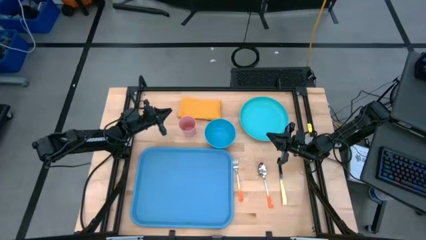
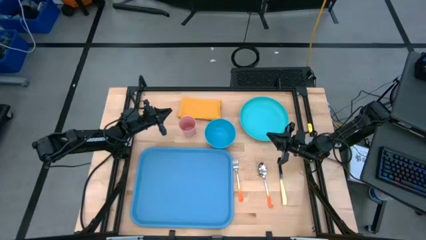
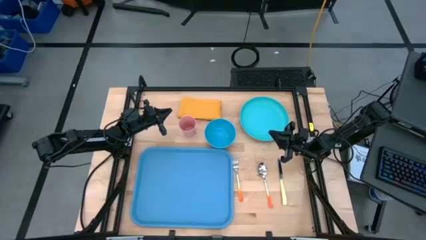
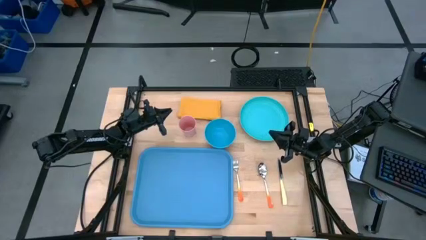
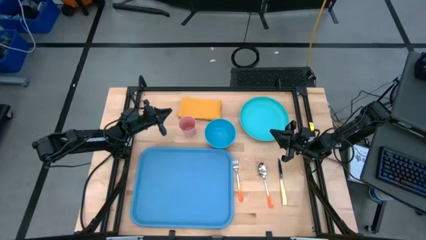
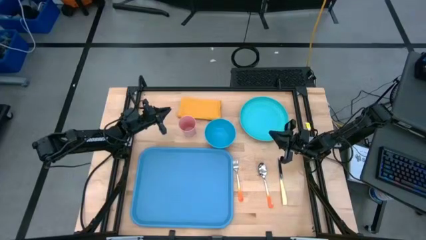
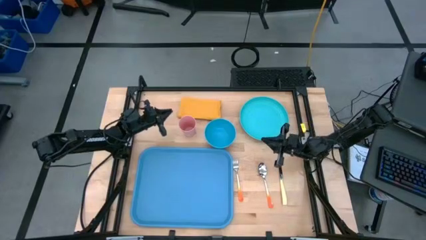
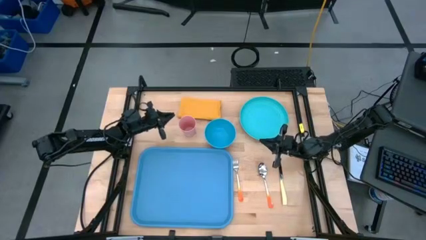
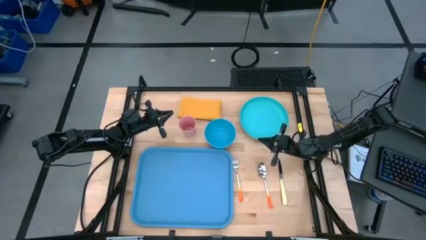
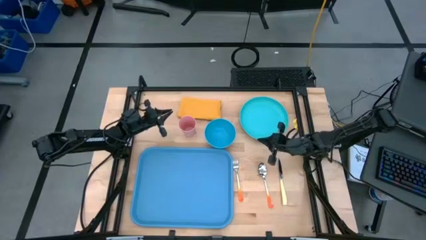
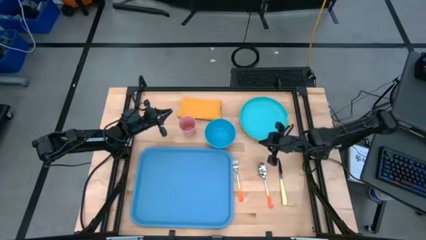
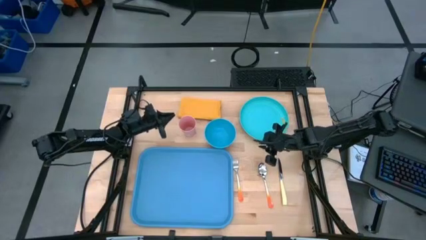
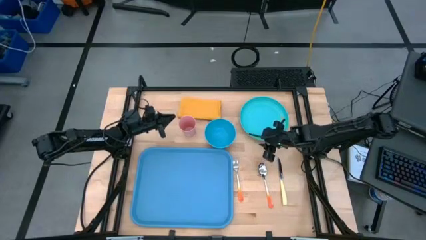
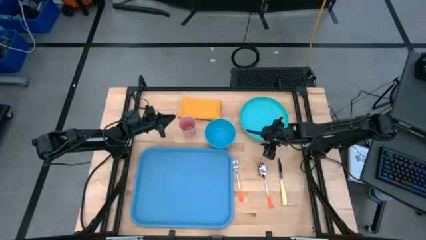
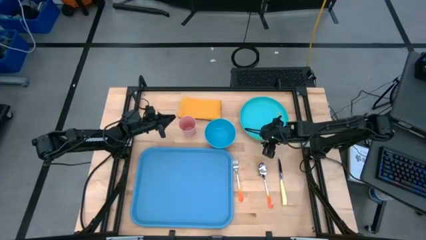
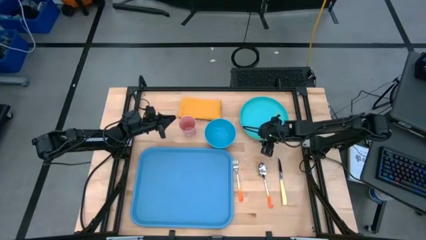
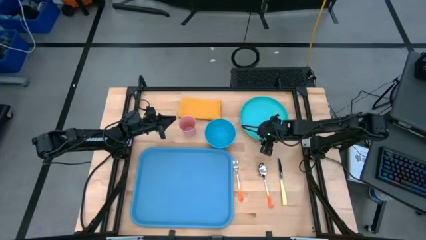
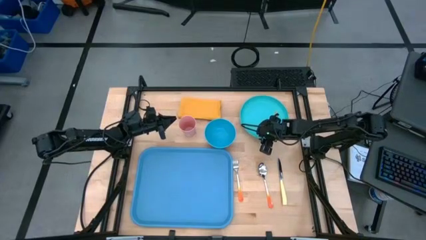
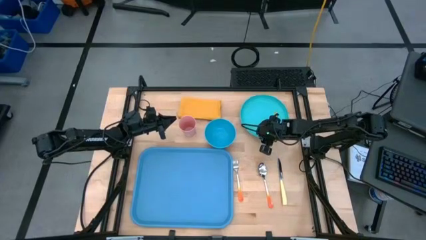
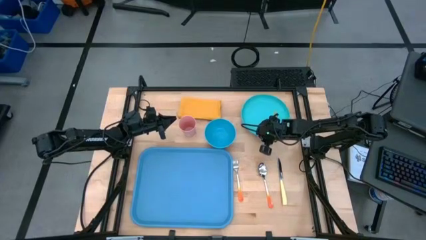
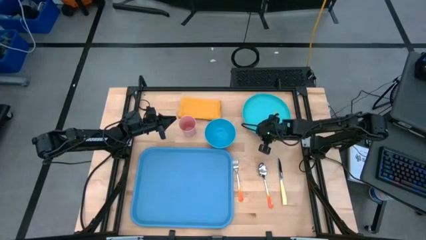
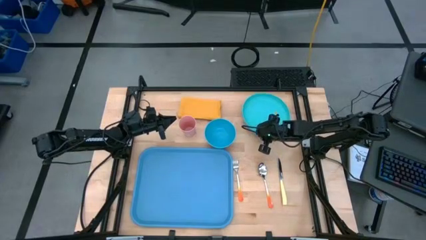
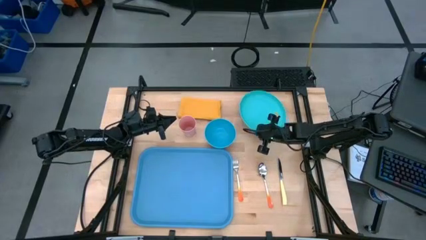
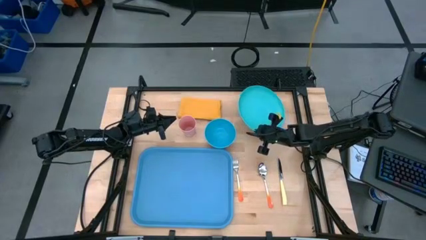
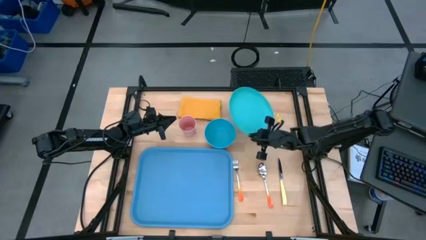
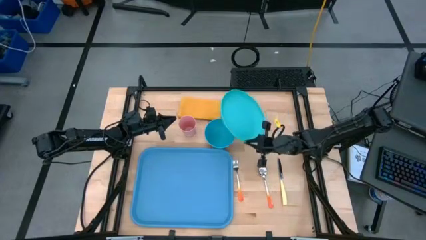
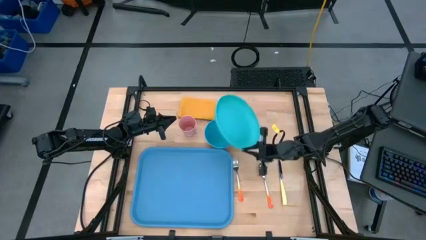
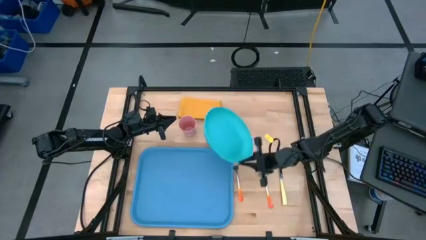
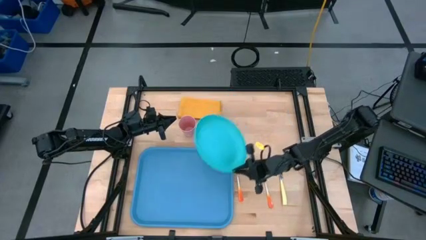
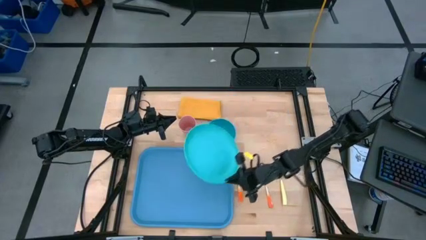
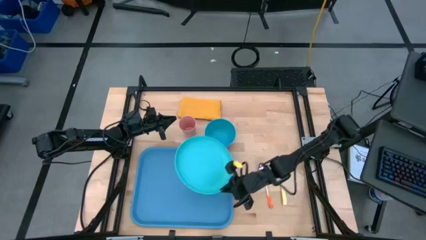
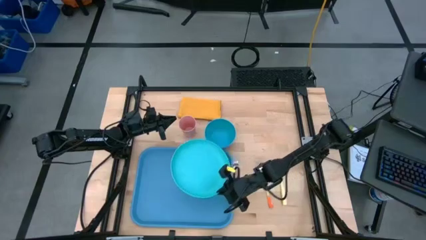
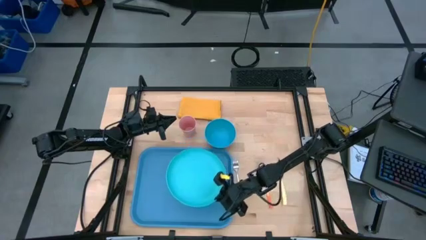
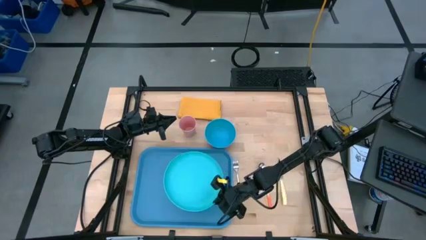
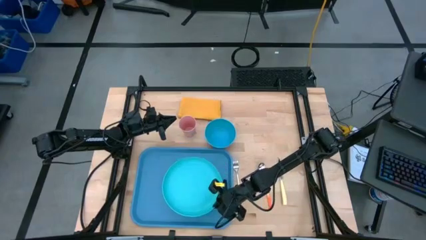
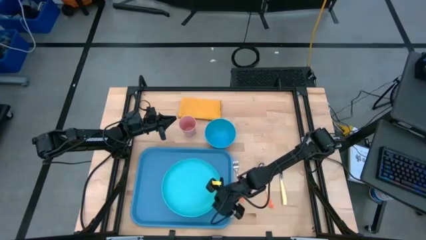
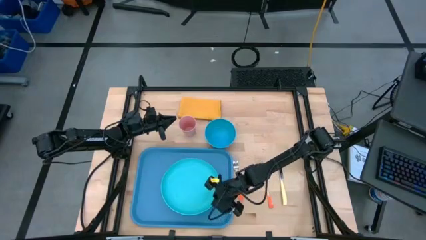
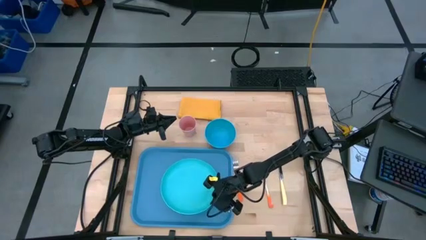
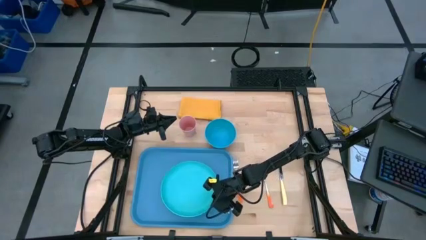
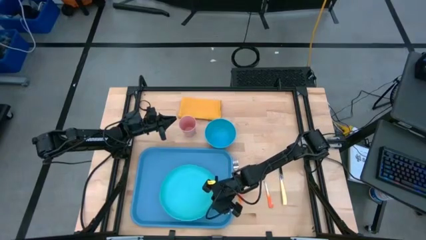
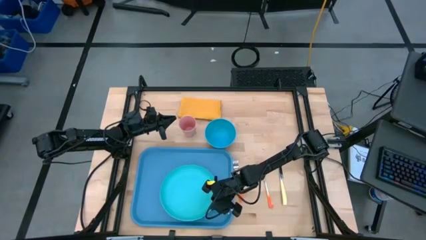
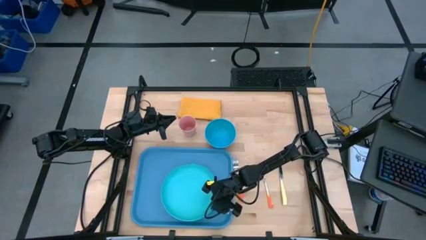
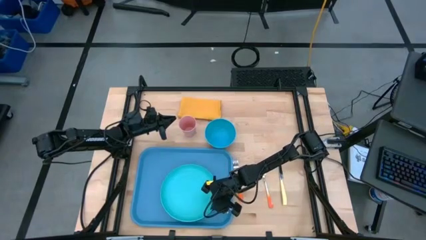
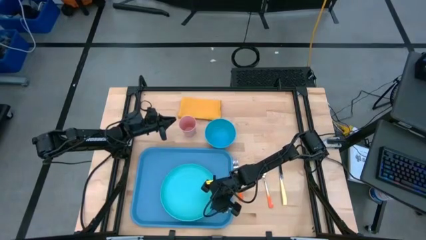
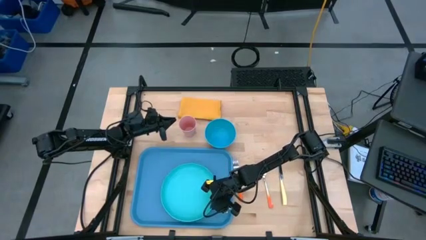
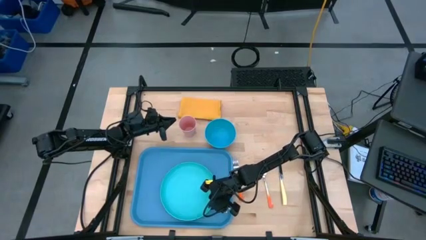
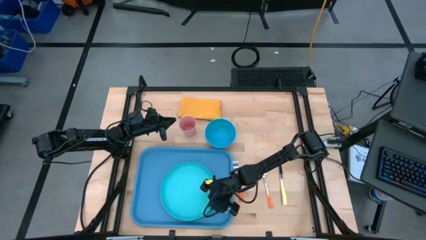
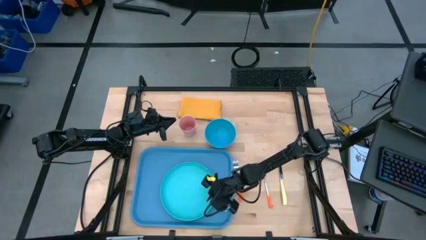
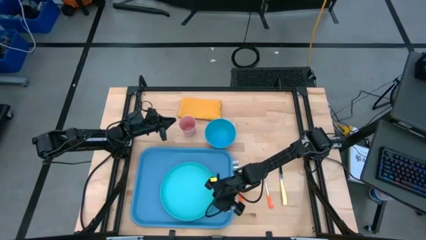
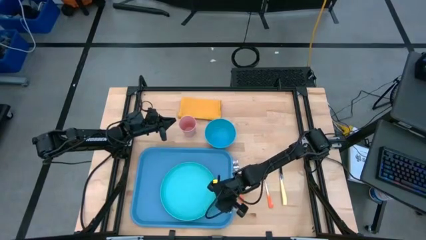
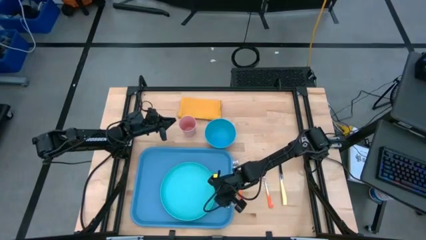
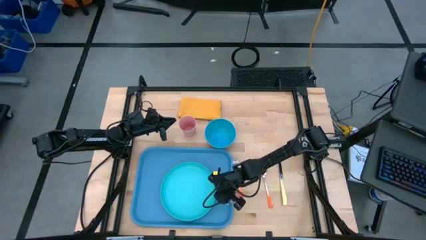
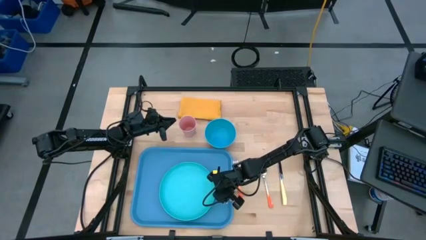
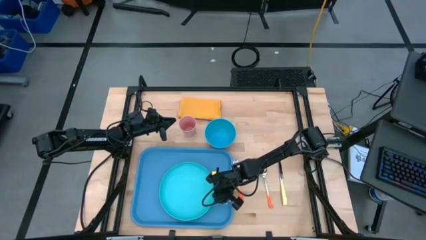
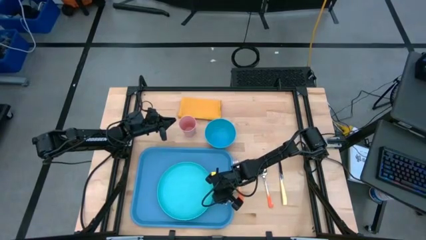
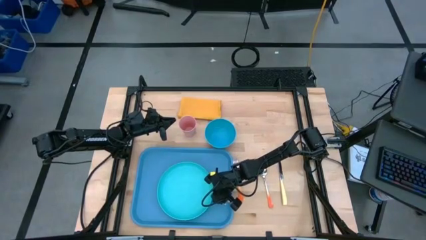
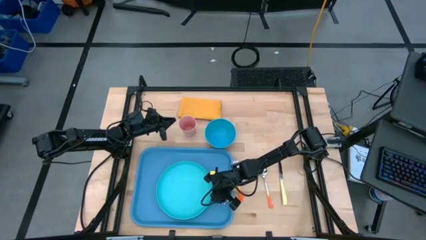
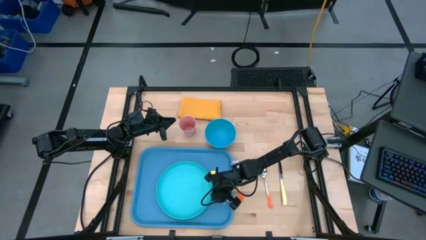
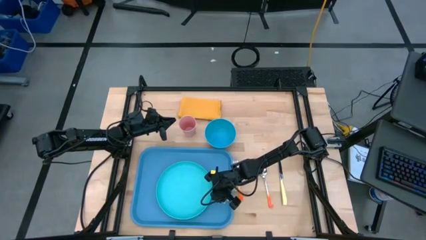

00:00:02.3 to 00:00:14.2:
Task: Set up tray
Put the green plate on top of the blue tray
